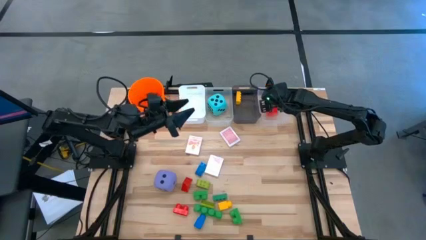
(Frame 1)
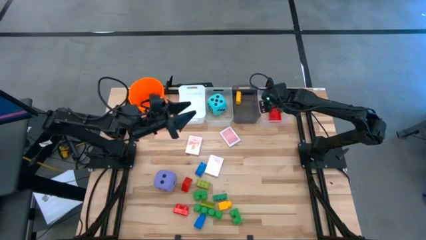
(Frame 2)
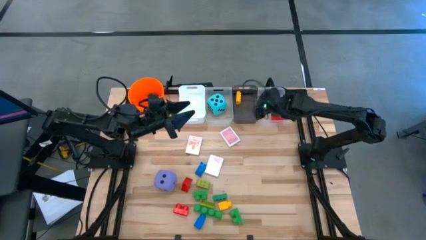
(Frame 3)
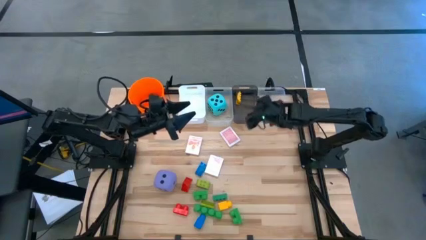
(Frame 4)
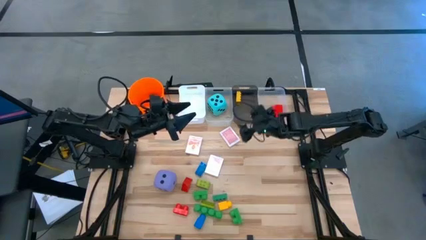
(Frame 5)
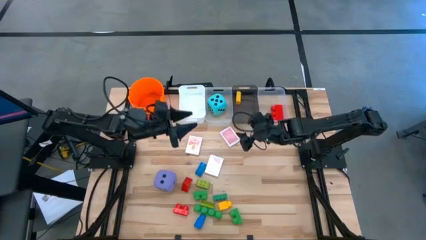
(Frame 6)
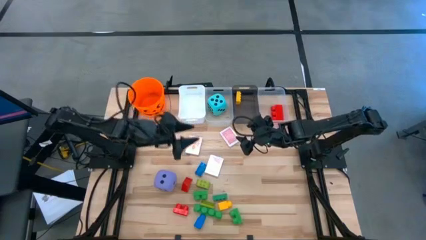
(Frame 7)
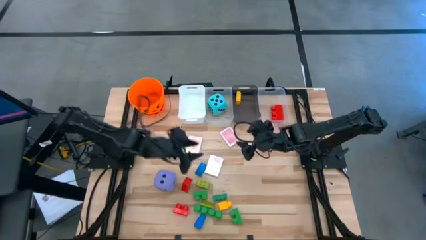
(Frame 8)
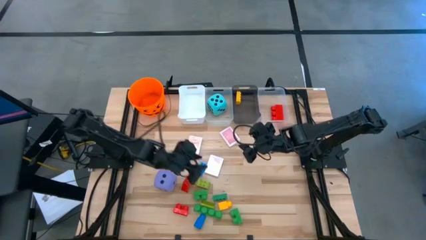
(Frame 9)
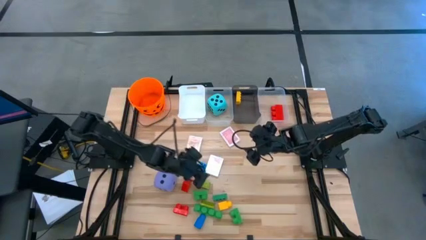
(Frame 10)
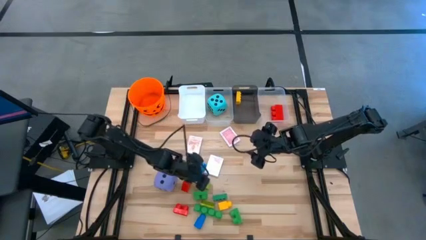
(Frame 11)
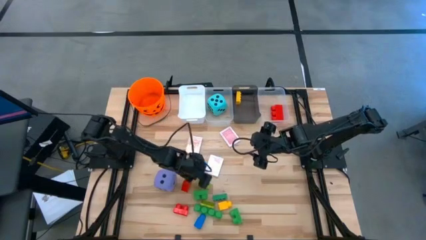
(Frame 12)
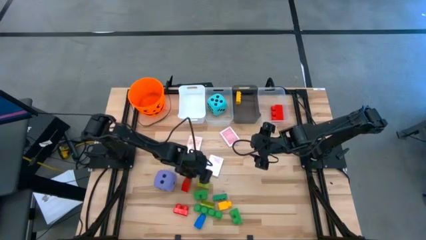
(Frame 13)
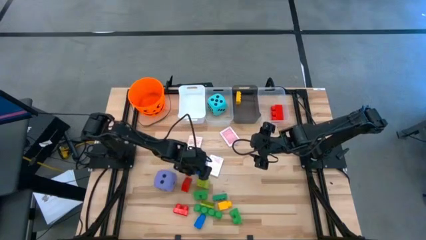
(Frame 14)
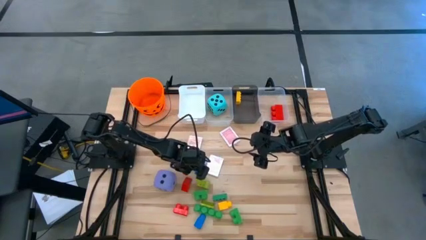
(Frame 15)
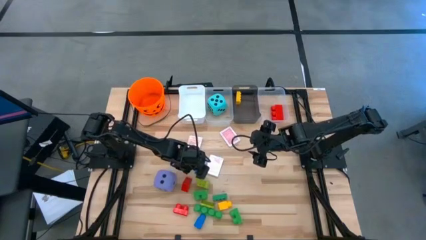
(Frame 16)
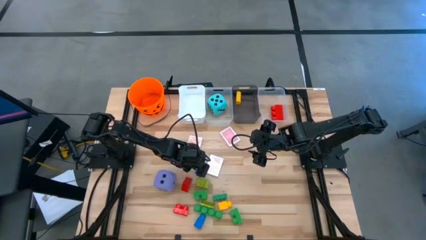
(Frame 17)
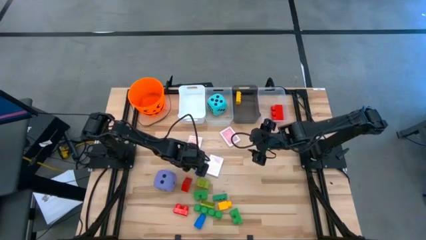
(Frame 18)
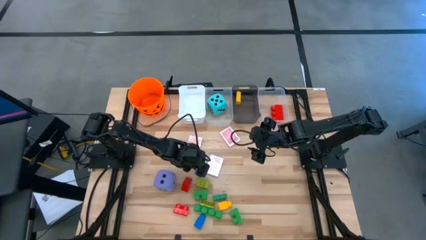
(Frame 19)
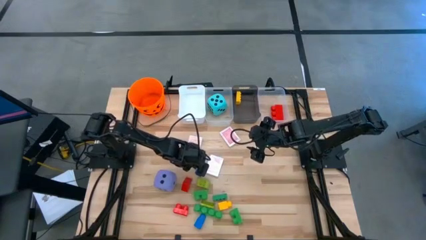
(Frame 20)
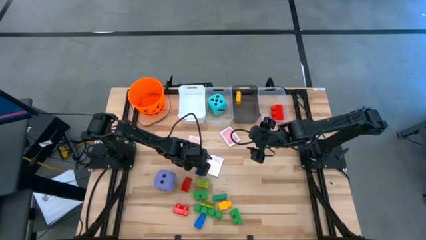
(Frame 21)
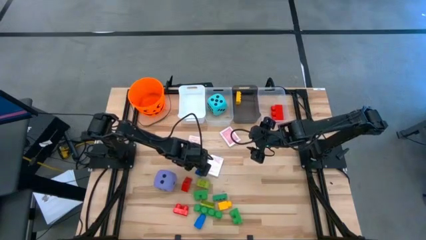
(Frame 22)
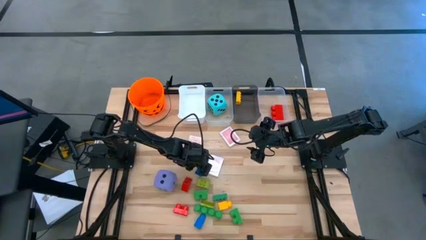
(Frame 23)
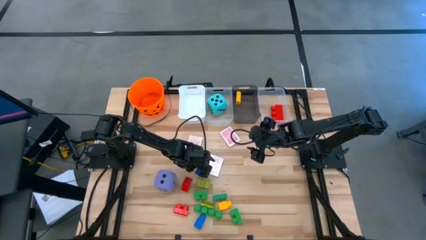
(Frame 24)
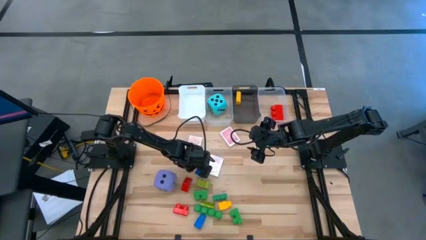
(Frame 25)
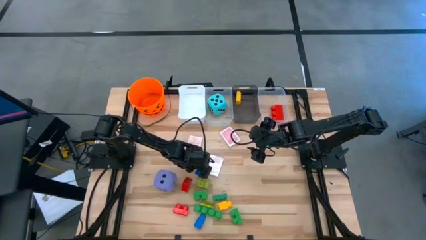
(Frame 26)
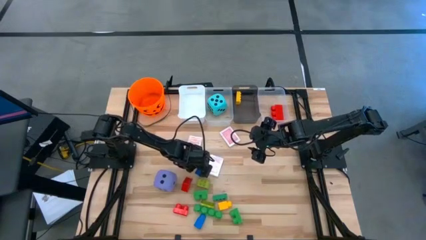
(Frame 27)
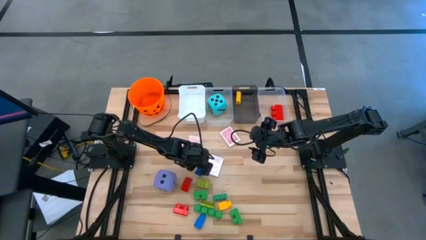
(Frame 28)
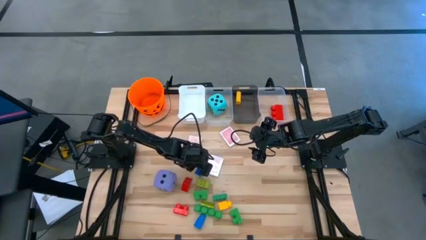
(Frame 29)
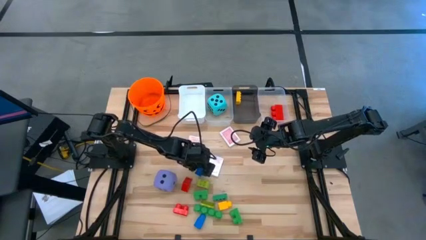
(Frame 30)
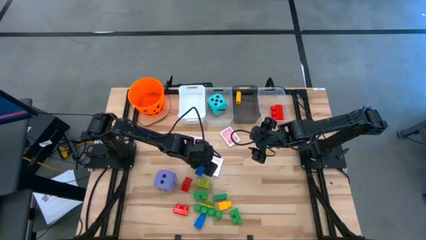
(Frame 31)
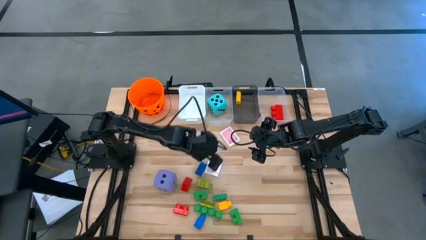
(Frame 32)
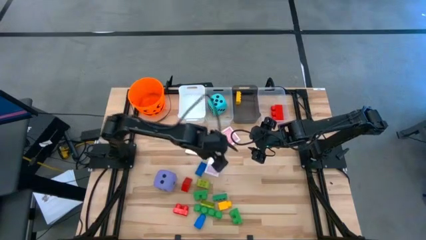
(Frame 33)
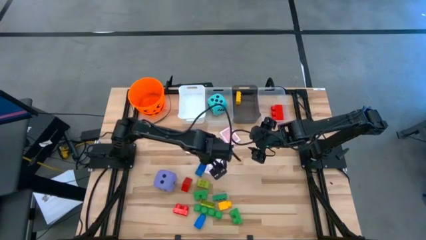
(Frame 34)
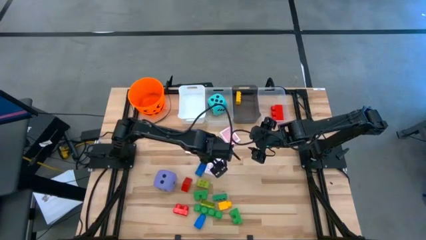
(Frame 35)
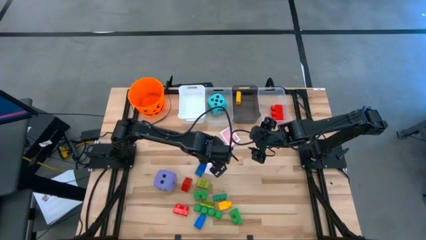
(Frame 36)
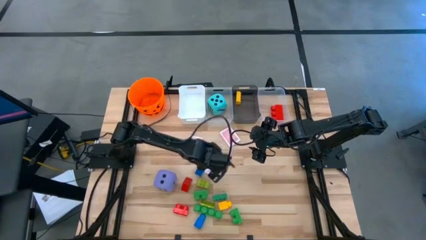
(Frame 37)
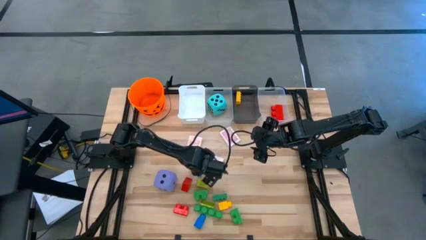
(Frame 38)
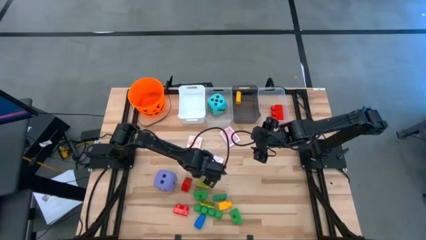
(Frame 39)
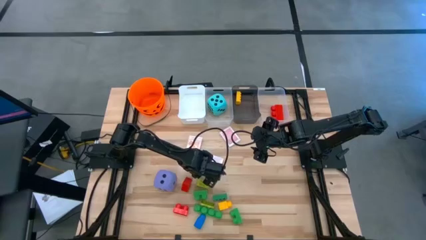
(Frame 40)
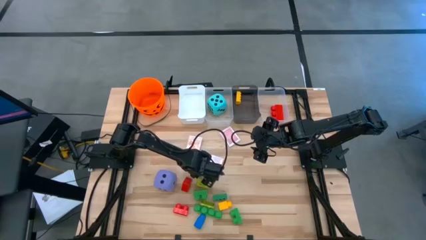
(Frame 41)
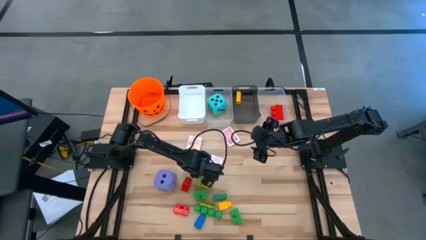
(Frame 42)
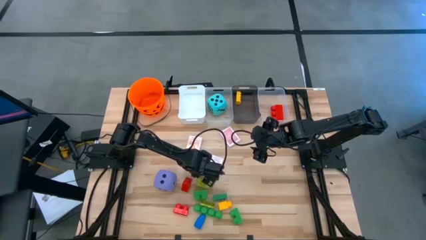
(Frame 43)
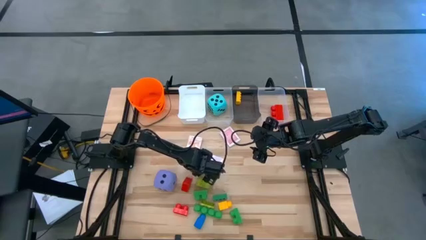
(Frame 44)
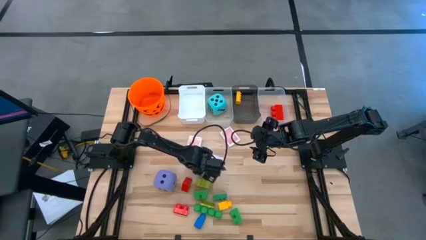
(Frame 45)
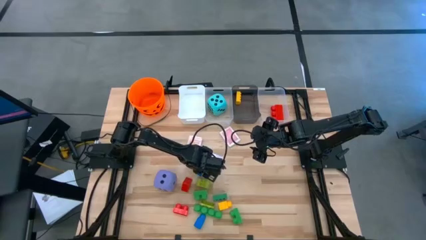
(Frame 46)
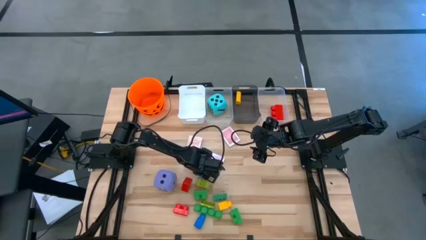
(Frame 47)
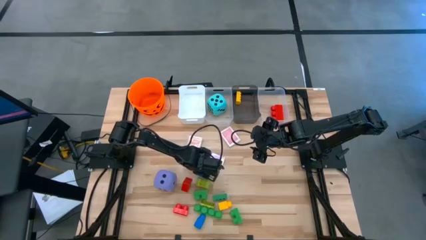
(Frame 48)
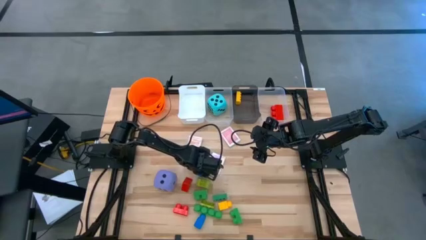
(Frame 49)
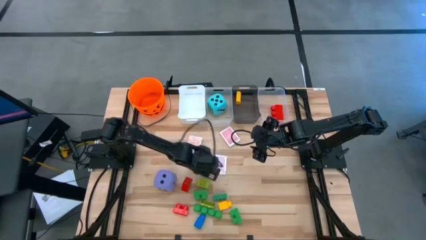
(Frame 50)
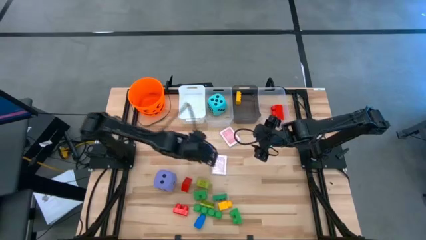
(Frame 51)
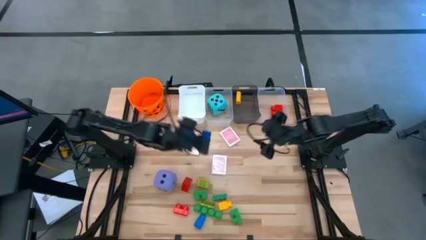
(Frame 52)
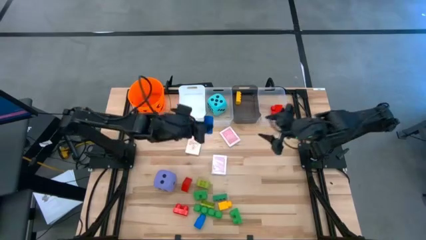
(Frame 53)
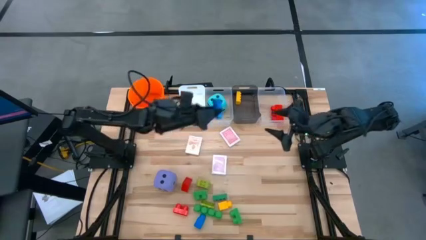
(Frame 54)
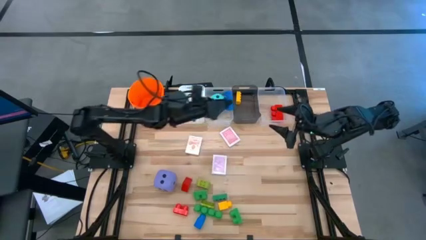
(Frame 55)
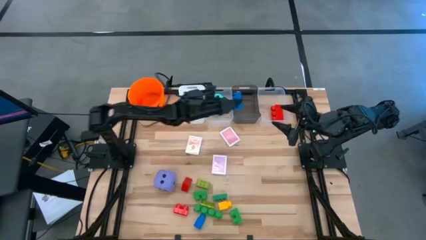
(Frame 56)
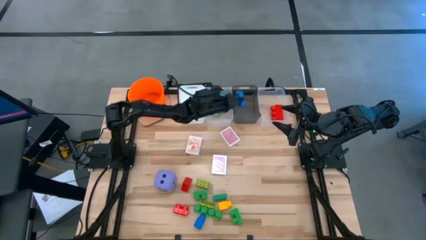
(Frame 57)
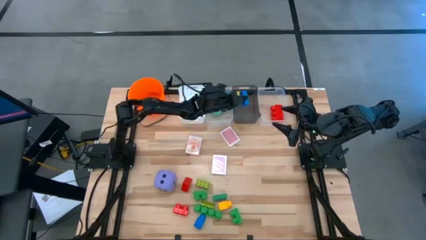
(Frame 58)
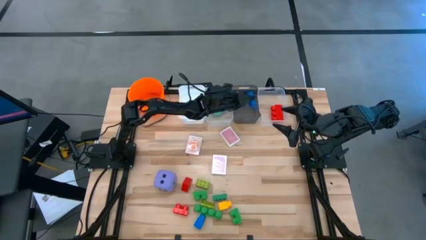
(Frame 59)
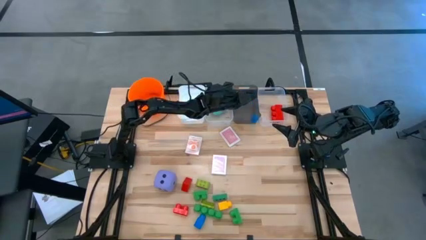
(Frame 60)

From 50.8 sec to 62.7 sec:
Task: Pick & Place Toys
Put the small blue game piece into the black bin
